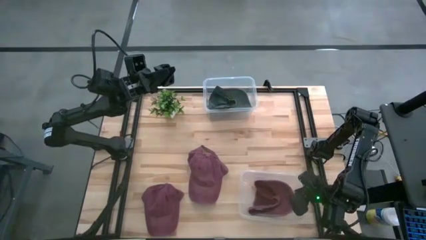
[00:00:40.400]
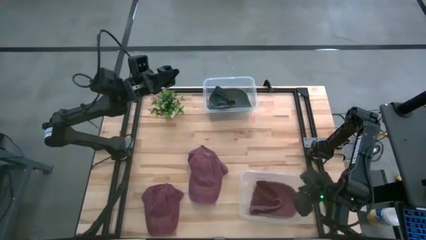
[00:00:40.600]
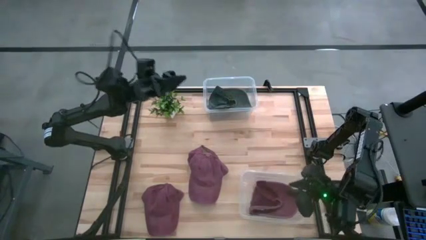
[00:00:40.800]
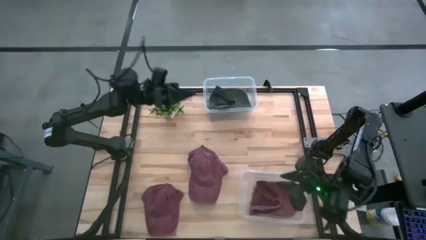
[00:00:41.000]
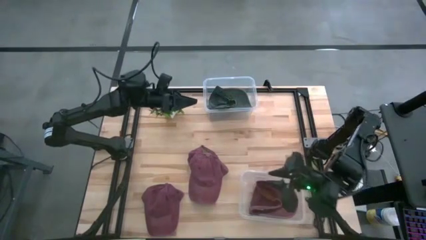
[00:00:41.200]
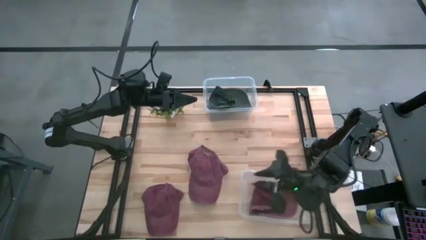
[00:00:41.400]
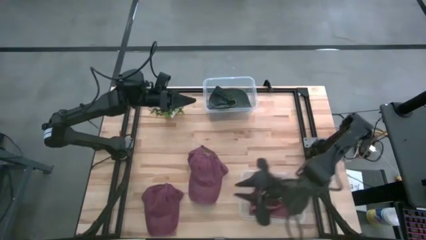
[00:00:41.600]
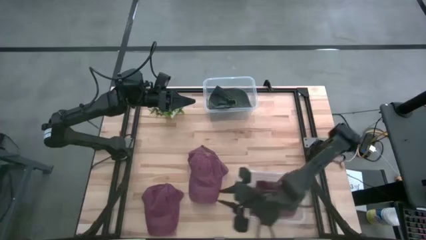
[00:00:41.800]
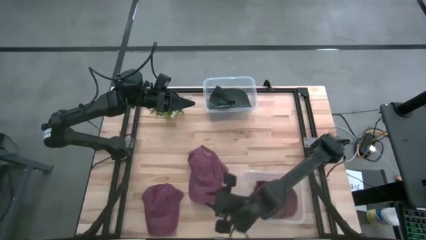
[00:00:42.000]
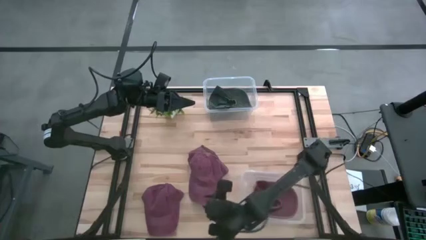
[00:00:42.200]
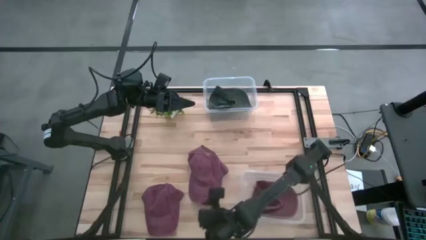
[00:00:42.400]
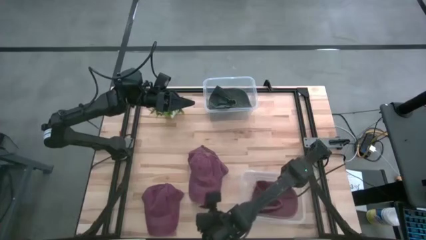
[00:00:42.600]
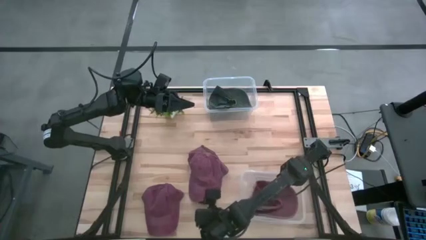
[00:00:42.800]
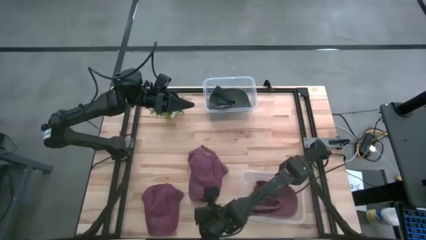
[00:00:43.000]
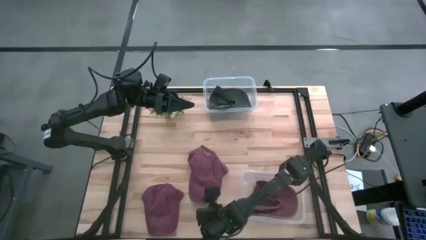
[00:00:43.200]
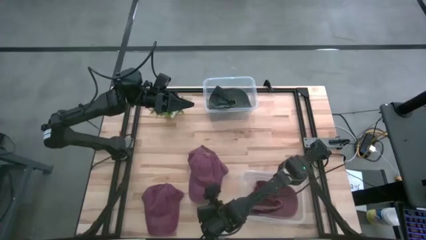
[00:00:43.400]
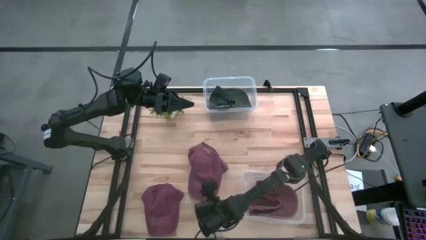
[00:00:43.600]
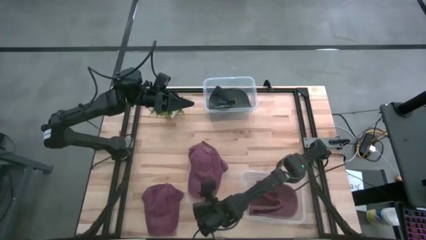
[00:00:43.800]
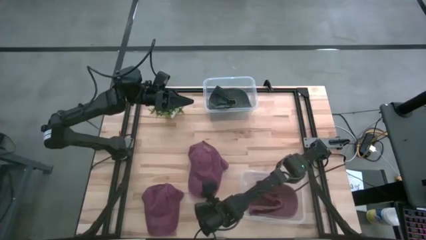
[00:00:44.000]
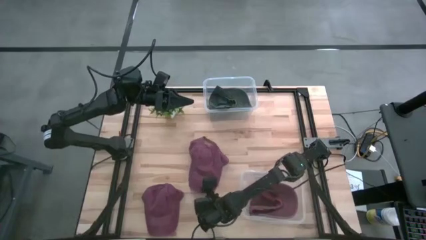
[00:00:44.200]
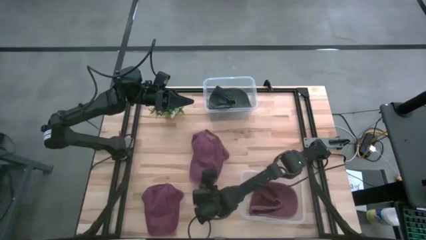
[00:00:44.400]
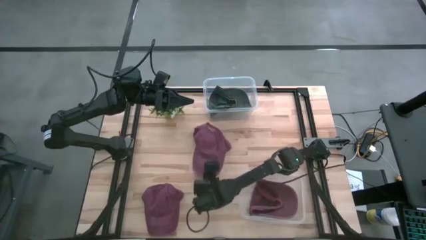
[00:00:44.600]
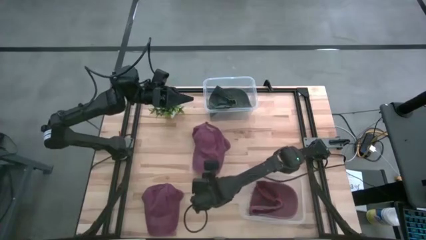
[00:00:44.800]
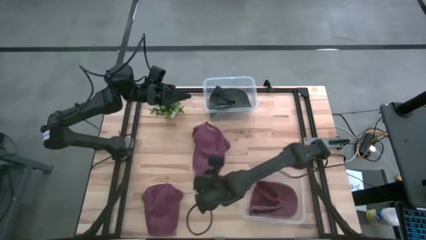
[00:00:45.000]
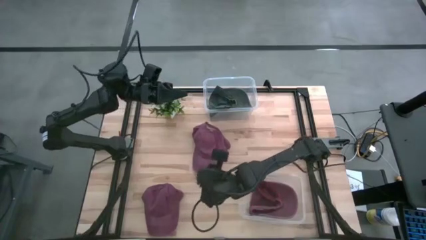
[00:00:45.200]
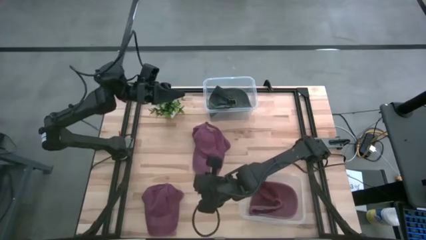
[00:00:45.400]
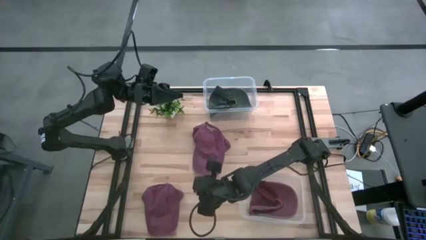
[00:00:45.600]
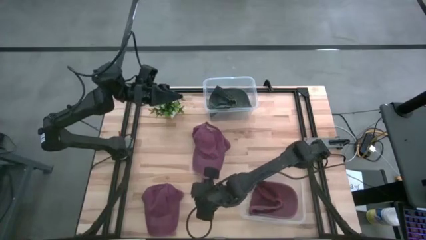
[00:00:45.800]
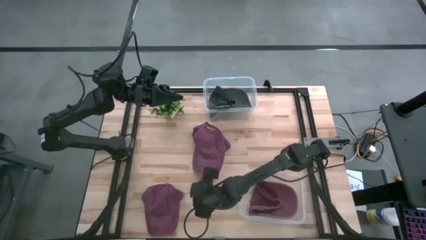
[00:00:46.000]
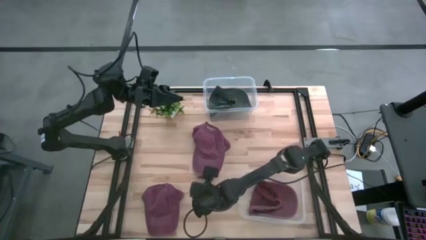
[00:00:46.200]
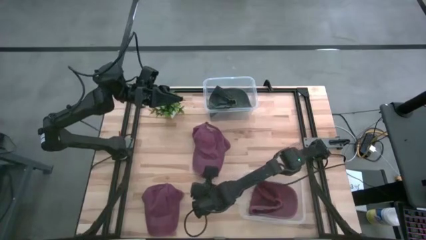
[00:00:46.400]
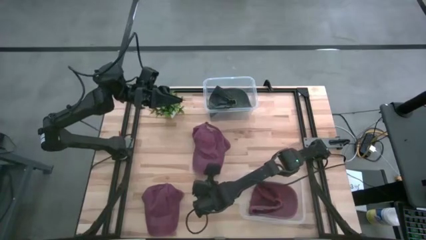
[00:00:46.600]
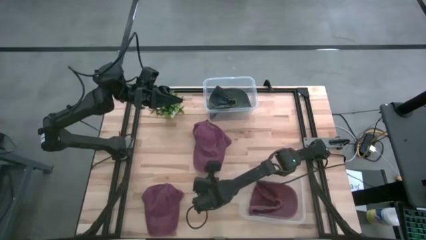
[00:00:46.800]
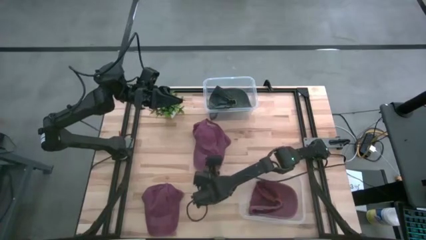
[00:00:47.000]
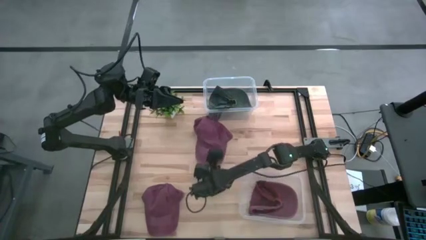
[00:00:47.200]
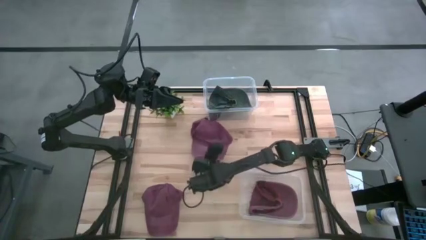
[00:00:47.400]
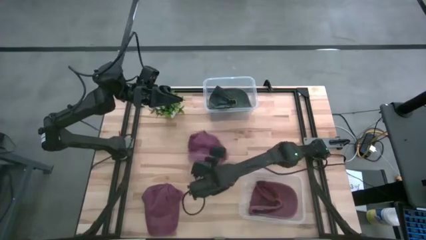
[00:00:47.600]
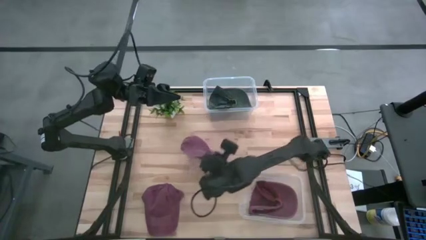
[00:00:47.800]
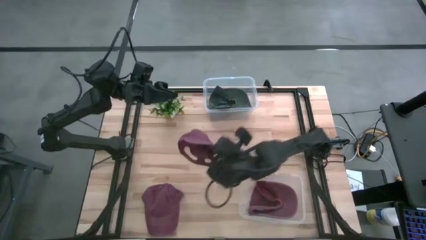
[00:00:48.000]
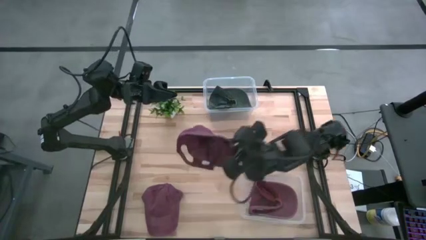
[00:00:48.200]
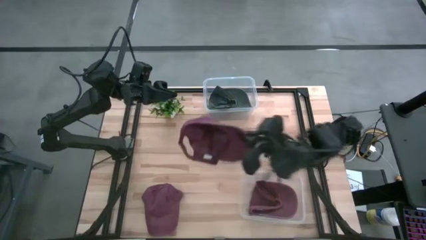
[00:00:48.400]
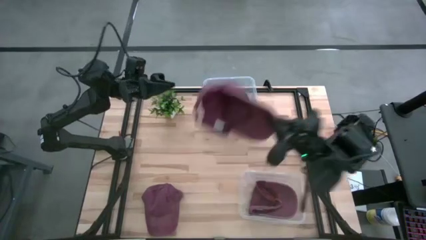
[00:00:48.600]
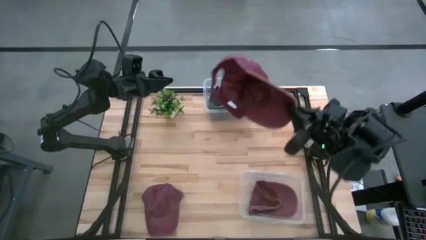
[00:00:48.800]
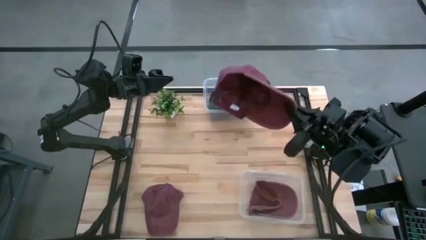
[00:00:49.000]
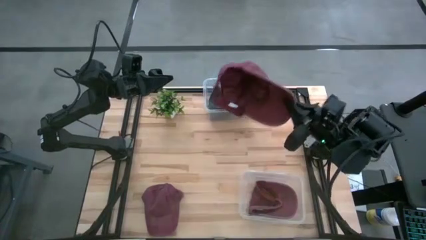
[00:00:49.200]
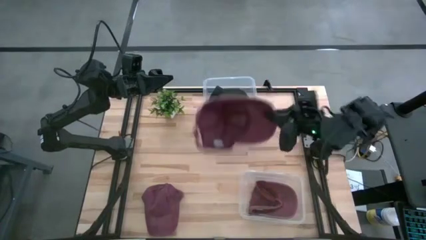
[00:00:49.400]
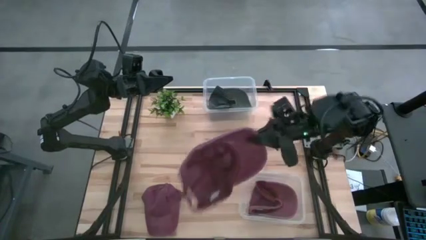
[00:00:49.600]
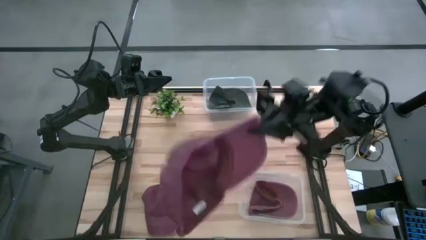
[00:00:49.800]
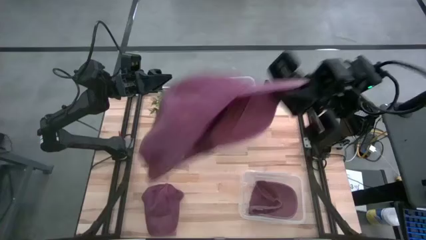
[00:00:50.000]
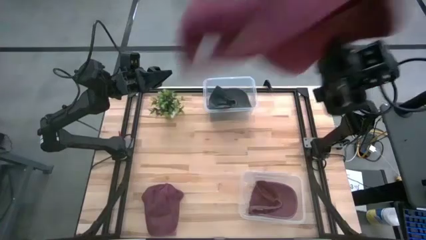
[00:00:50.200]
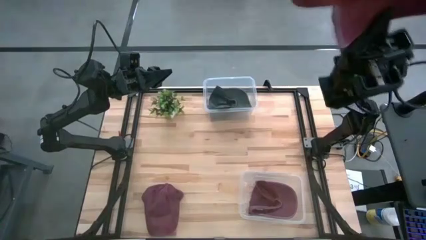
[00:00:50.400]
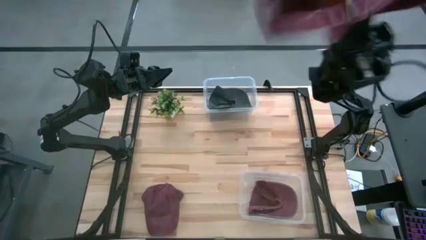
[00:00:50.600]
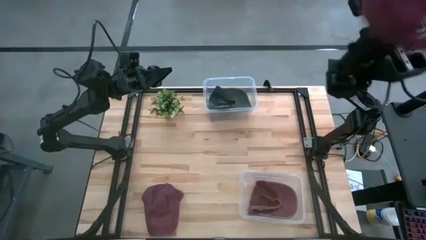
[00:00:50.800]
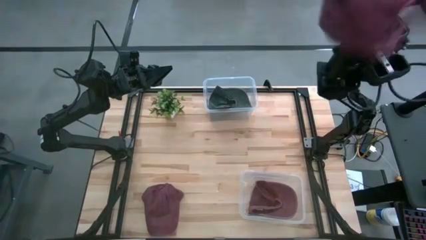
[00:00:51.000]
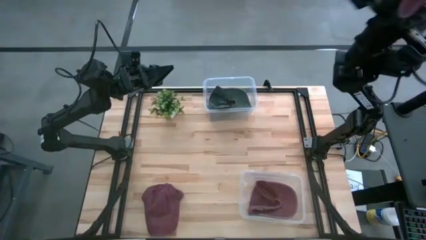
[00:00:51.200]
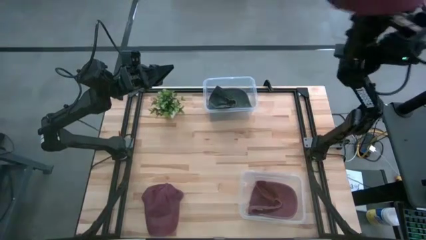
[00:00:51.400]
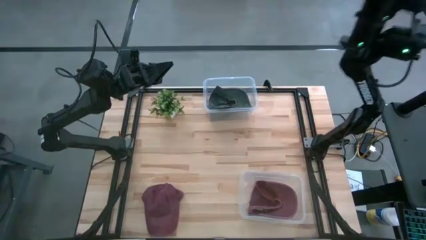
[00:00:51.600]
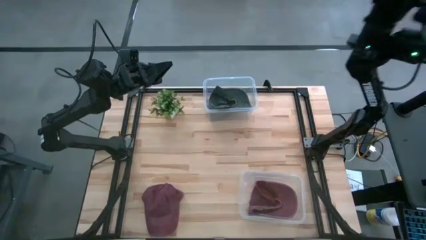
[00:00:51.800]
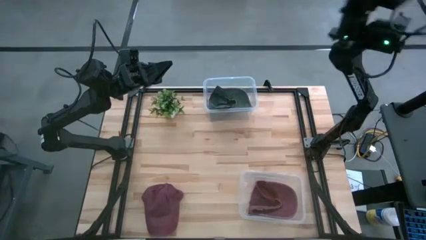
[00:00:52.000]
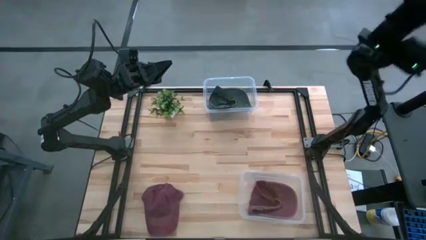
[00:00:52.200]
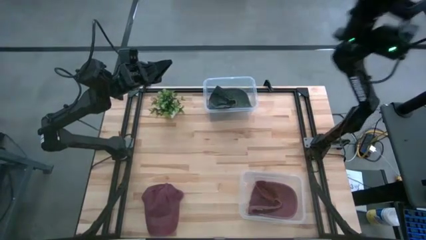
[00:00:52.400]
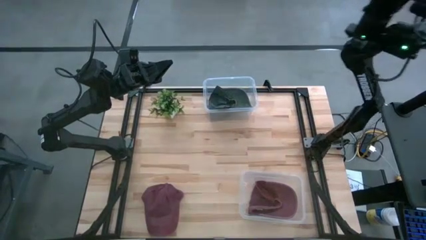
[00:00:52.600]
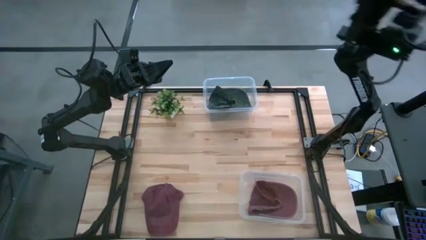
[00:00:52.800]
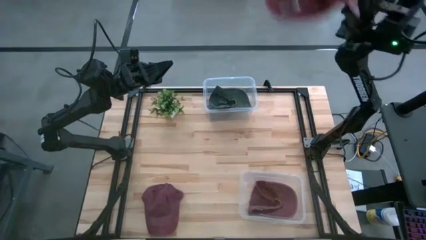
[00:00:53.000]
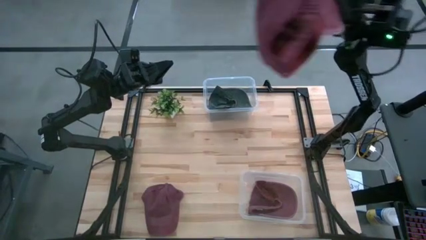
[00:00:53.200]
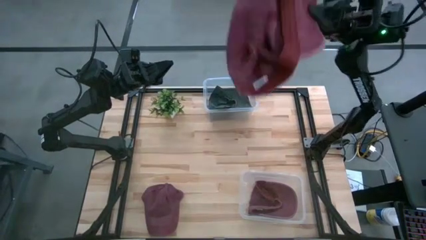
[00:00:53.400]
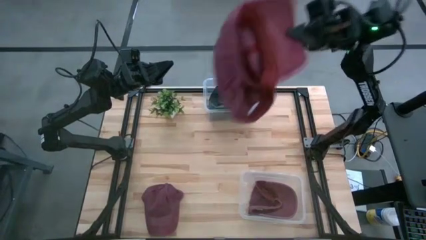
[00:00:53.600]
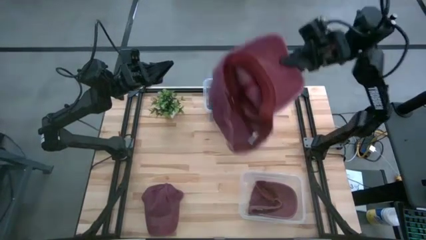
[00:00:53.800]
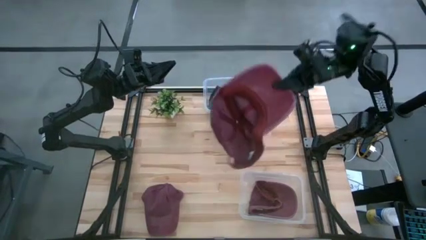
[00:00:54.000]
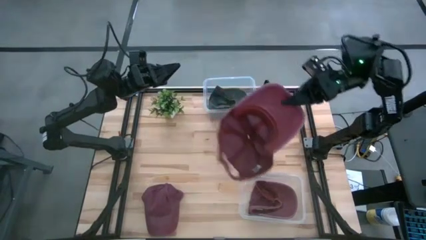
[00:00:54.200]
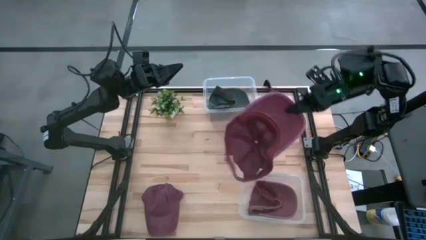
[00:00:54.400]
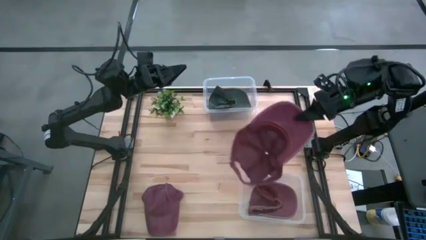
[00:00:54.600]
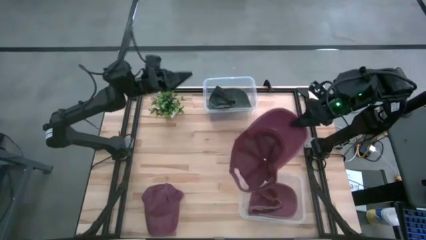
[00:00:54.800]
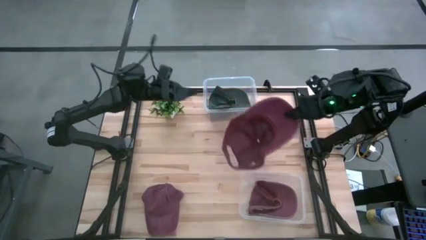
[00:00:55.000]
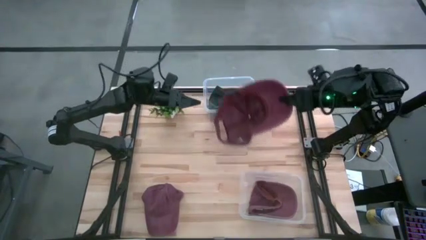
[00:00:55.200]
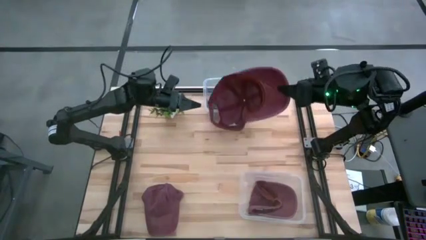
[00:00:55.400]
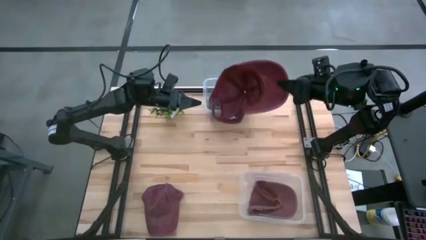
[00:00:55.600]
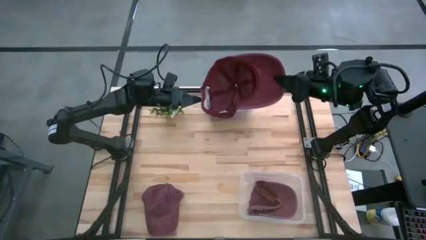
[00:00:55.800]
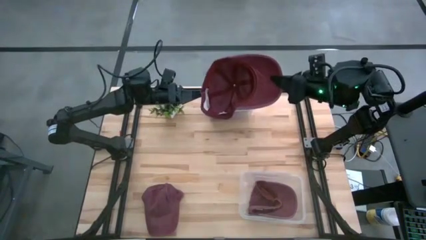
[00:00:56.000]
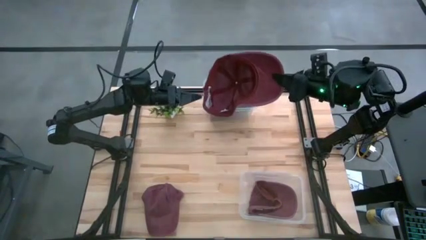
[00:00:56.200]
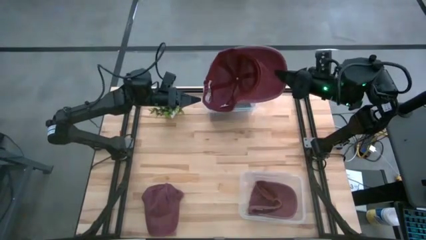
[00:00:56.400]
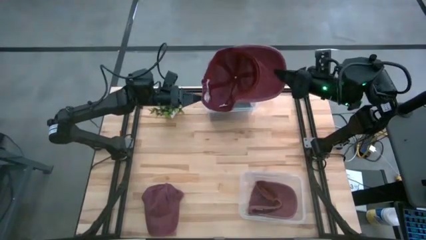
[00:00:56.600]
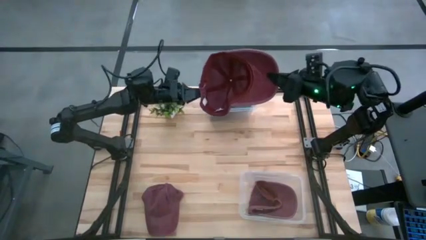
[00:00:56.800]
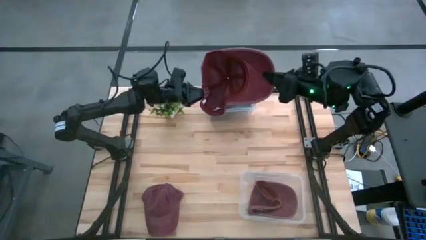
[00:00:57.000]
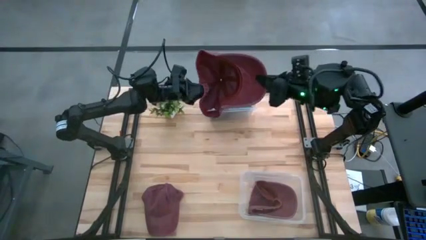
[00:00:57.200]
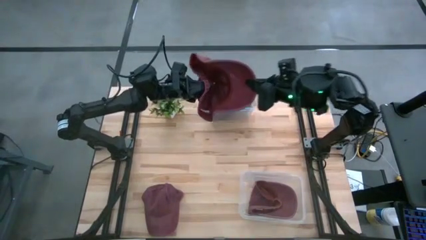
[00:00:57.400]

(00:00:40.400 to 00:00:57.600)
Task: Pick & Place hat
Put the maroon cap into the bottom transparent bin
